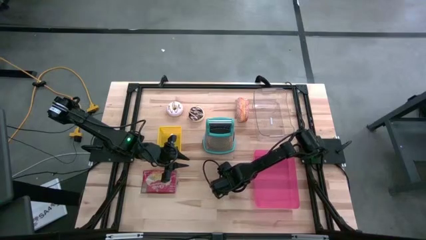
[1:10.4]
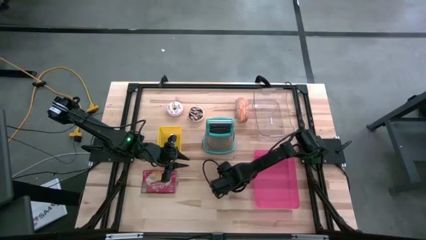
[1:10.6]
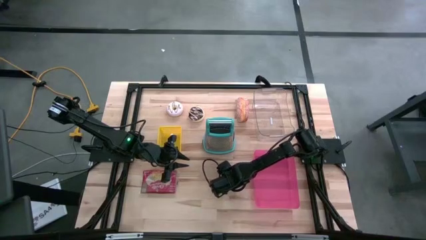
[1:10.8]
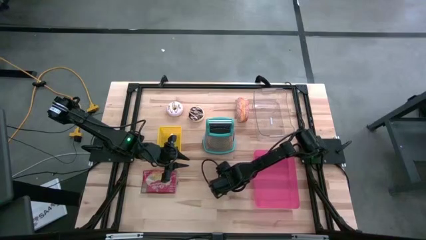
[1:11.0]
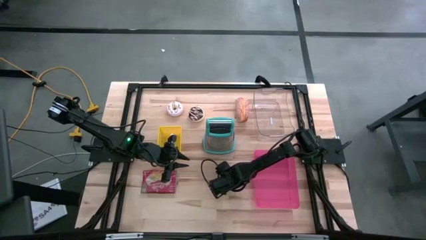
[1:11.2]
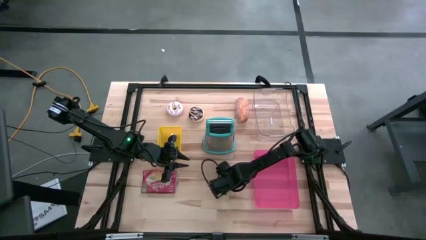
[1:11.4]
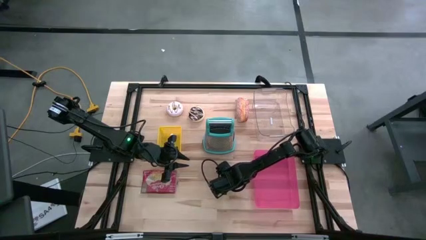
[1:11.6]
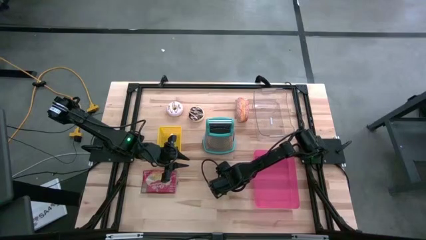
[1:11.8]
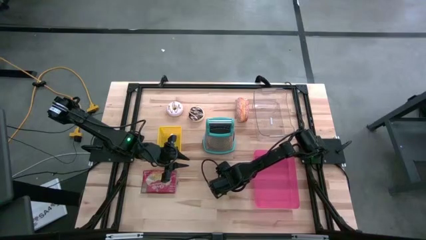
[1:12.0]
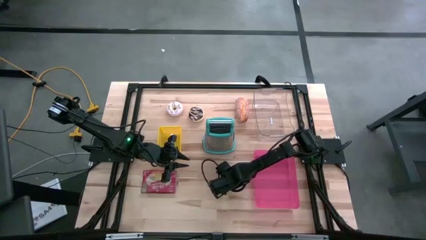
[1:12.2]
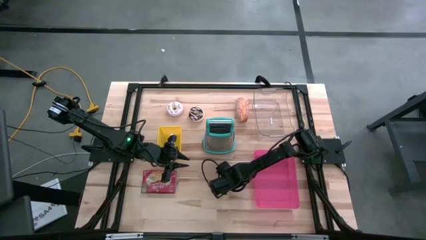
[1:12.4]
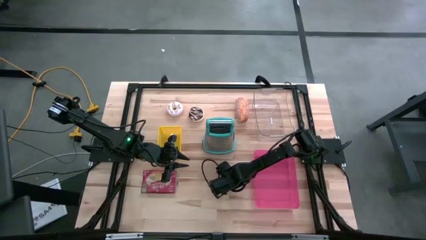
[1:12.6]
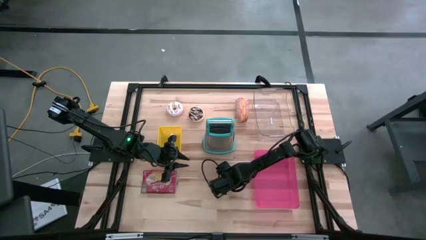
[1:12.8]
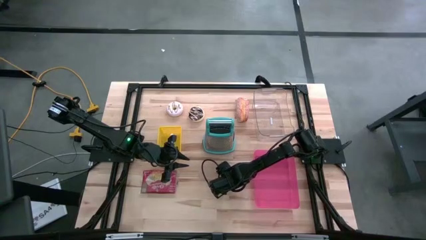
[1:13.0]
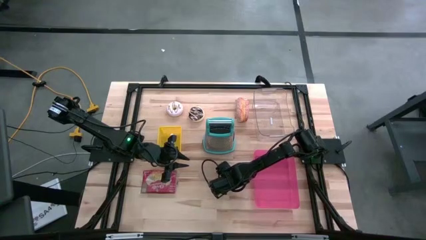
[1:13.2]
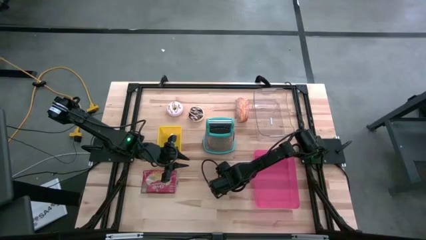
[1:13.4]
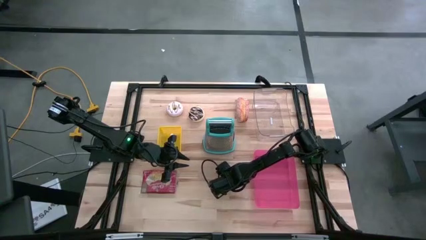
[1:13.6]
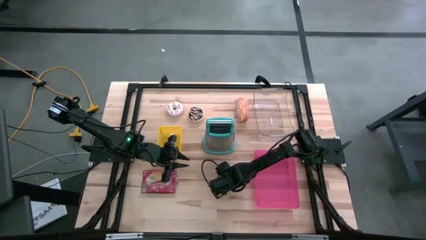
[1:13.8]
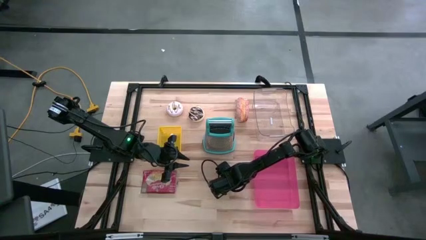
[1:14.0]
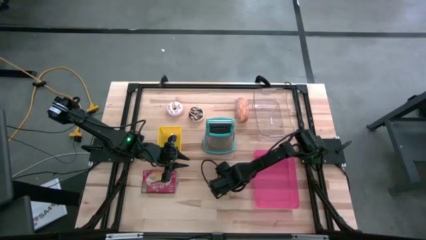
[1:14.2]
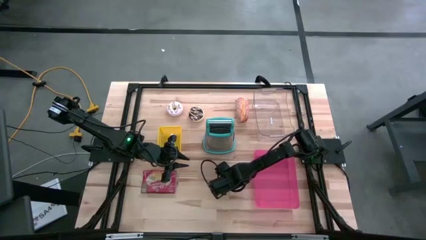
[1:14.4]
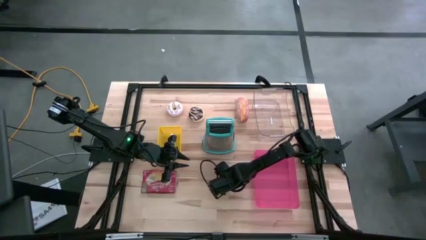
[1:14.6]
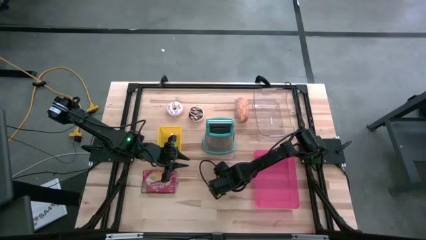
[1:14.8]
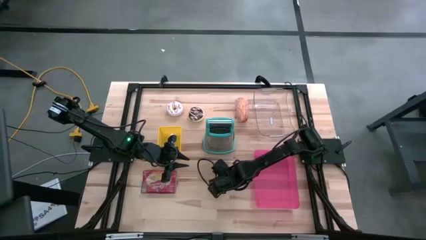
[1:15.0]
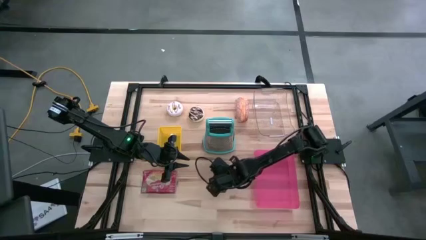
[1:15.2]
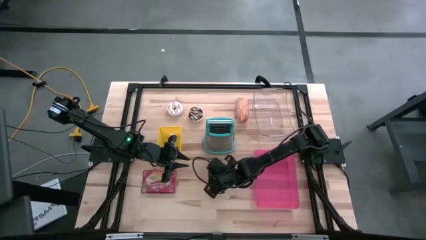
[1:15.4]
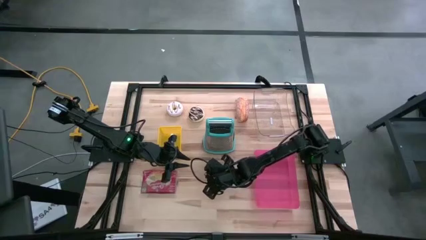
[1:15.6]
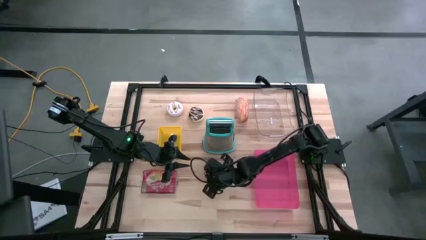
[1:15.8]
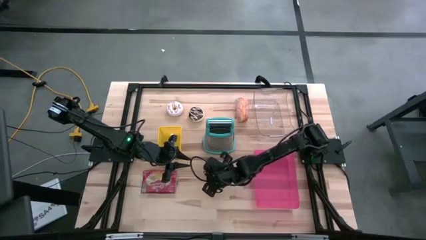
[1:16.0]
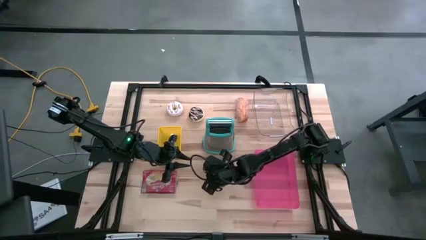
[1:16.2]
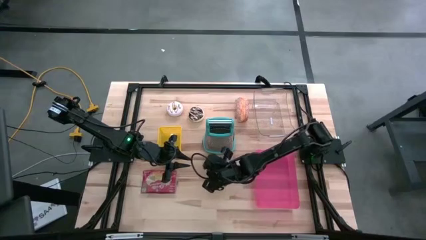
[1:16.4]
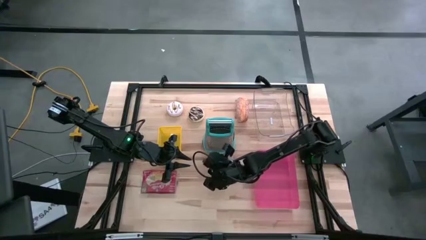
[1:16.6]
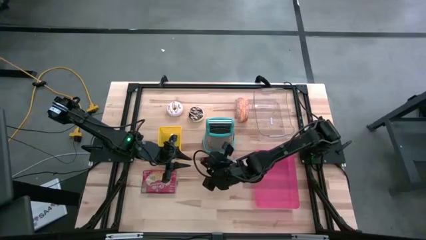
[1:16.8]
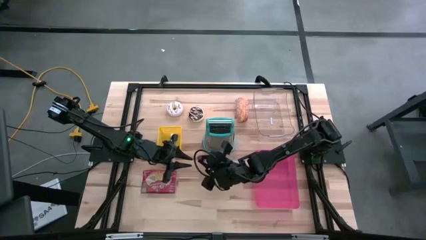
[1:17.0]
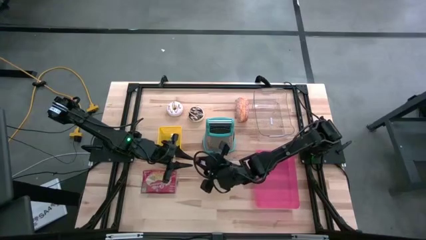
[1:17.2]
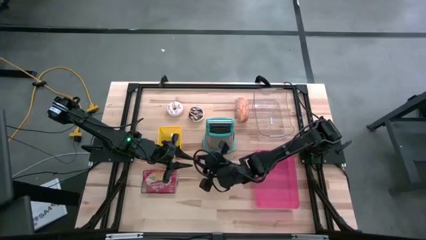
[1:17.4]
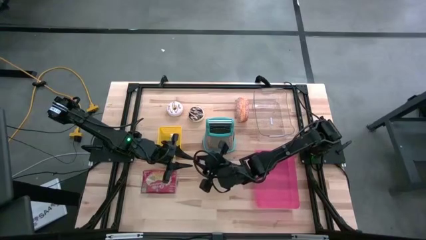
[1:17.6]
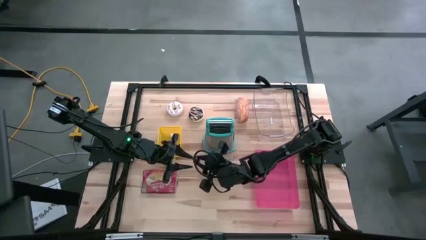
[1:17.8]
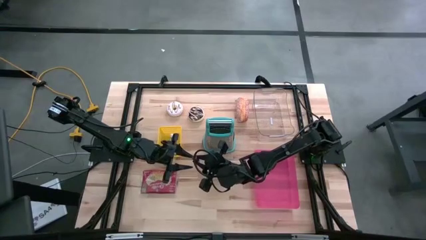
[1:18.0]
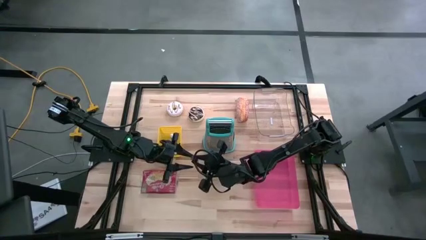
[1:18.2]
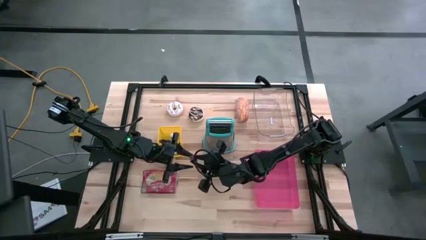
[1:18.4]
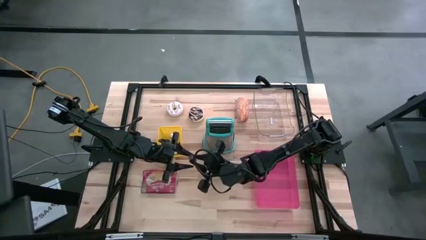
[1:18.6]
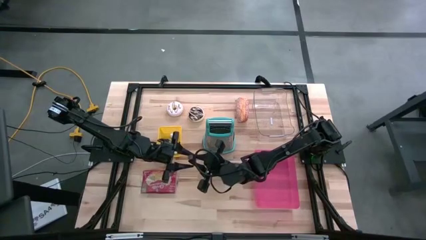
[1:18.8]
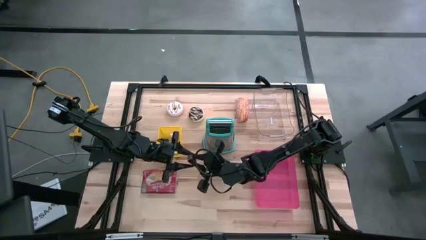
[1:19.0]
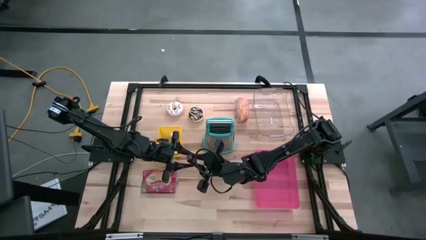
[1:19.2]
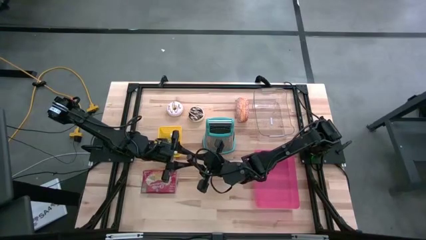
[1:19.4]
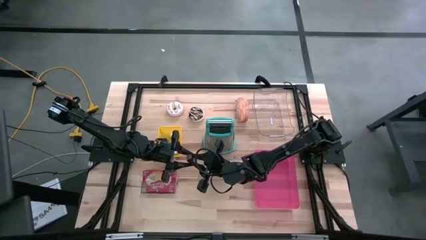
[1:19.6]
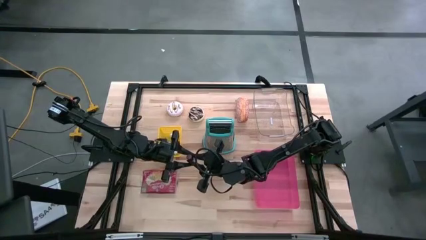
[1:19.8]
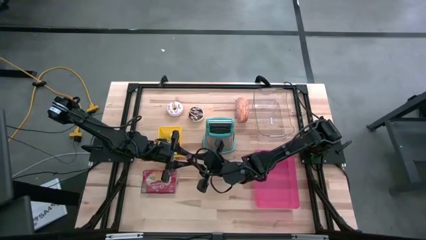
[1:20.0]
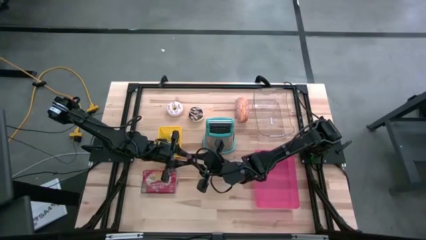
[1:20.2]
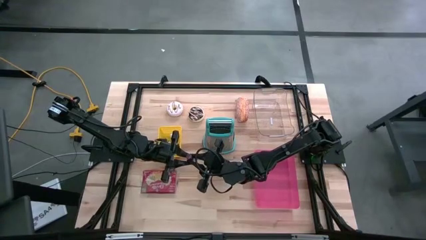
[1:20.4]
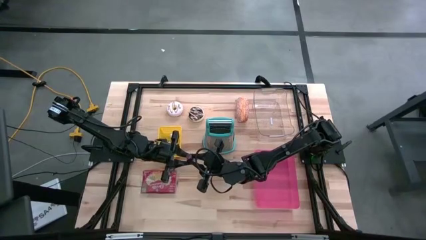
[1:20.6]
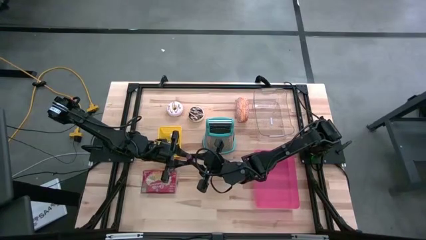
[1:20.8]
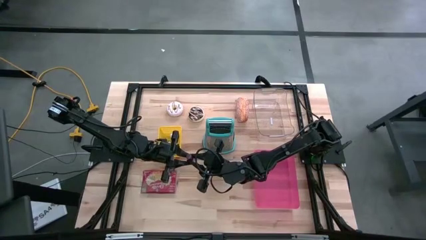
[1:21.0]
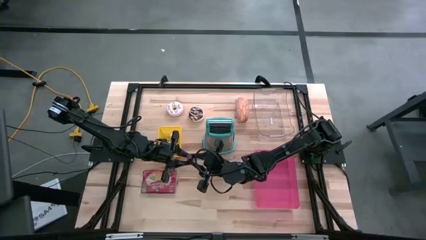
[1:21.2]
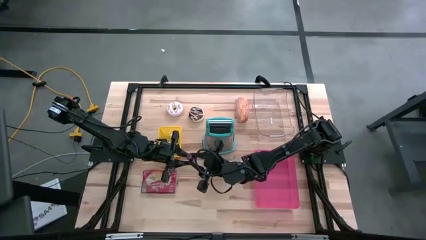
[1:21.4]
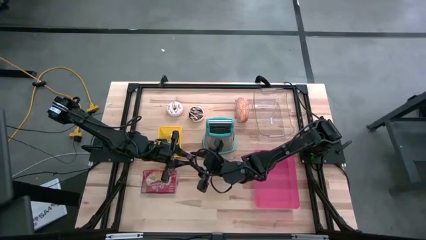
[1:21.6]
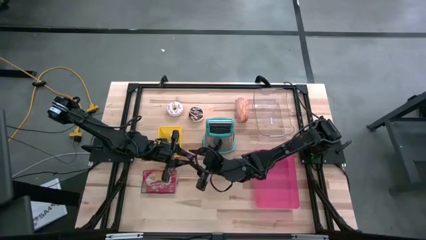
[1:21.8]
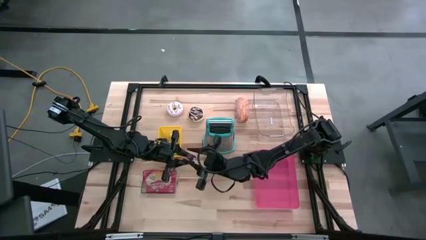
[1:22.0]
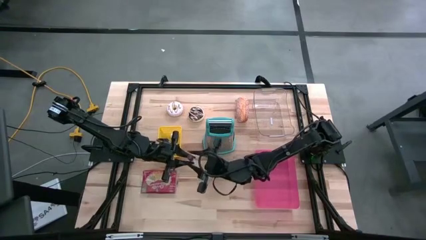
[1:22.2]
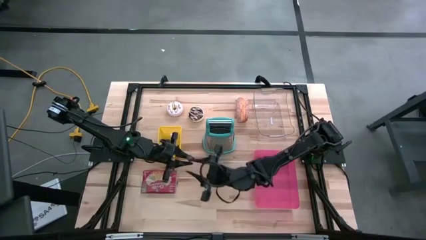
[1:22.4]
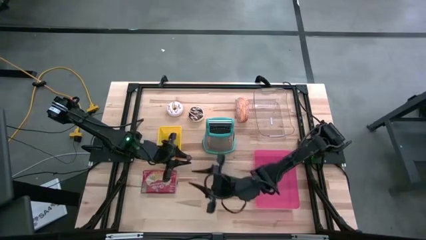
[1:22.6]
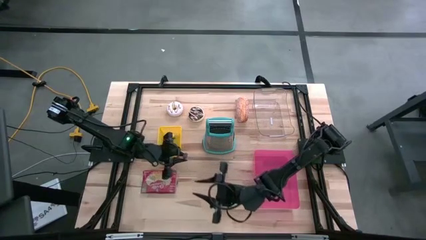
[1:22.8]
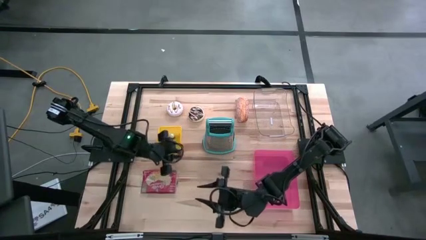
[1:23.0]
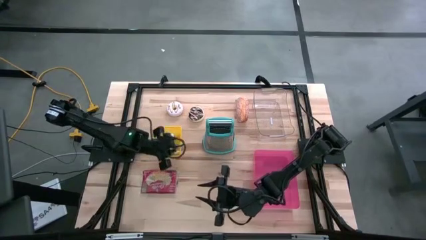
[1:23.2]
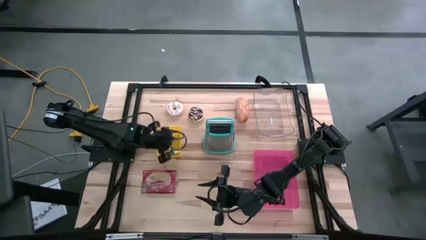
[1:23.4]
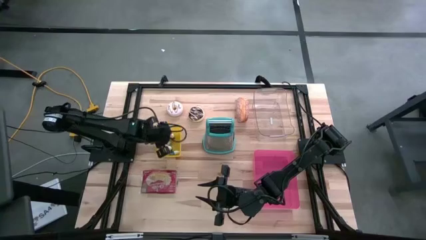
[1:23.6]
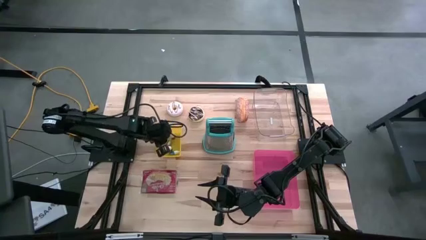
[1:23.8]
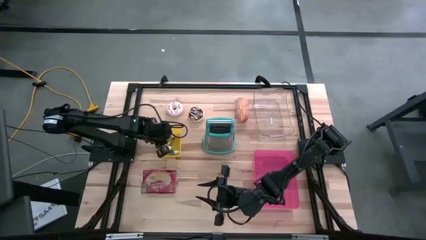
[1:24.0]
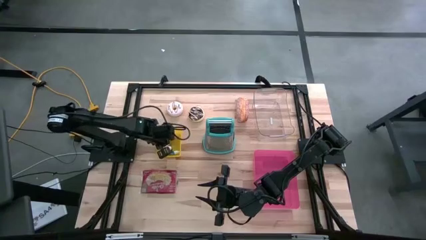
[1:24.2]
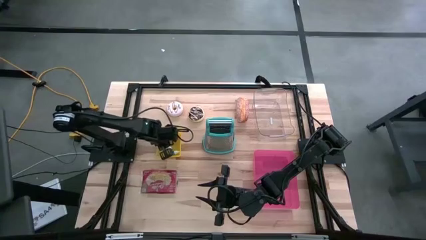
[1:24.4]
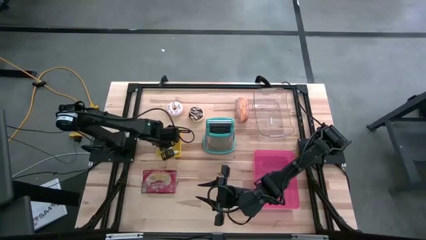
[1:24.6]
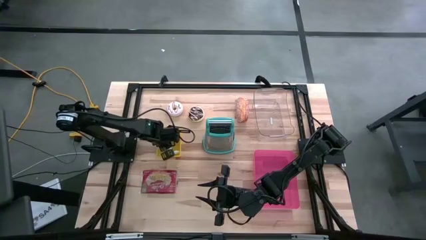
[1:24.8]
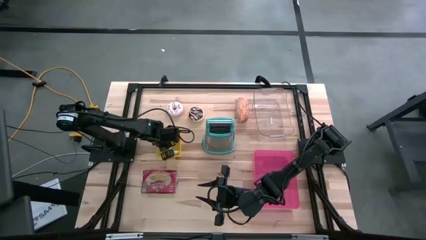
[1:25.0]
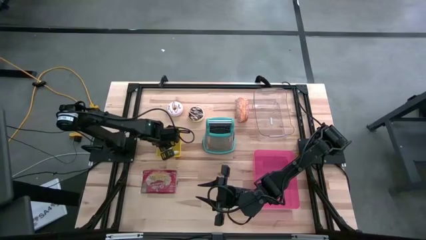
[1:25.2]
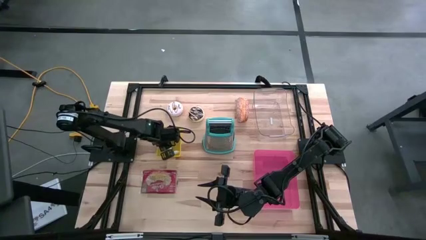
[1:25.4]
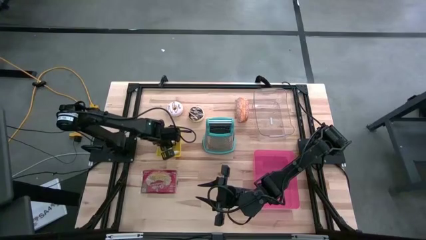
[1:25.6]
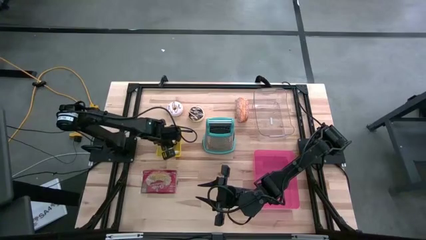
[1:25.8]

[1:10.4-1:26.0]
Put the orange food coloring bottle into the yellow bin
